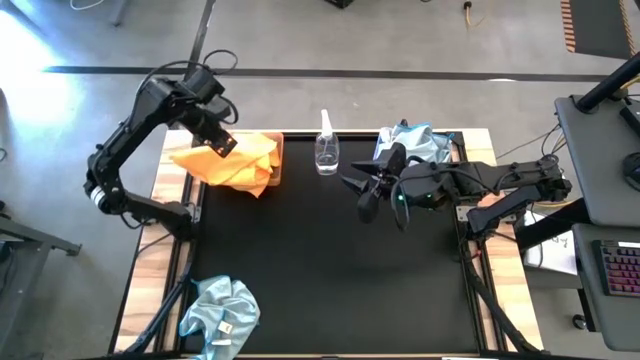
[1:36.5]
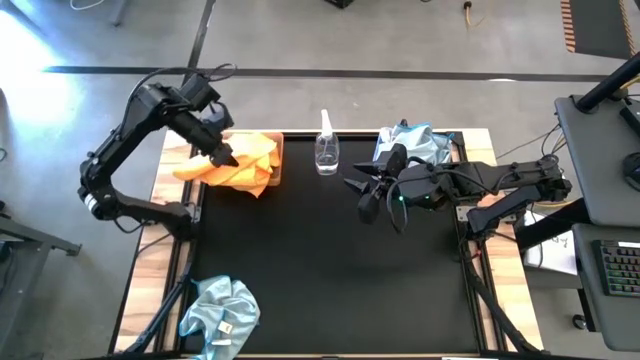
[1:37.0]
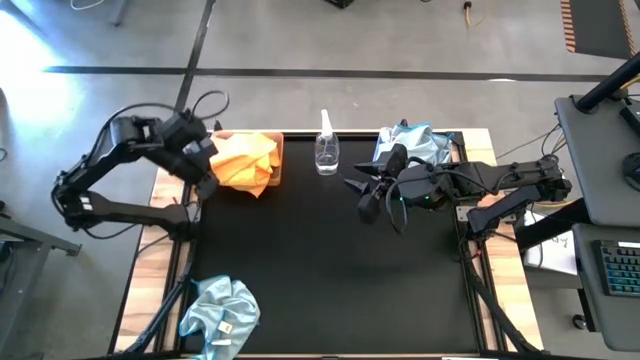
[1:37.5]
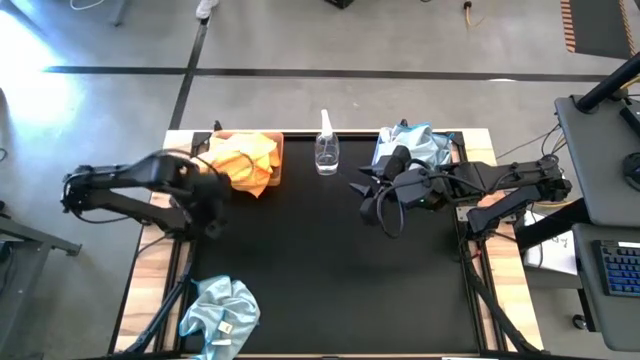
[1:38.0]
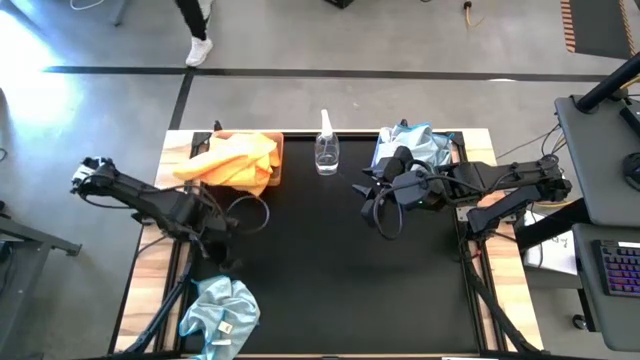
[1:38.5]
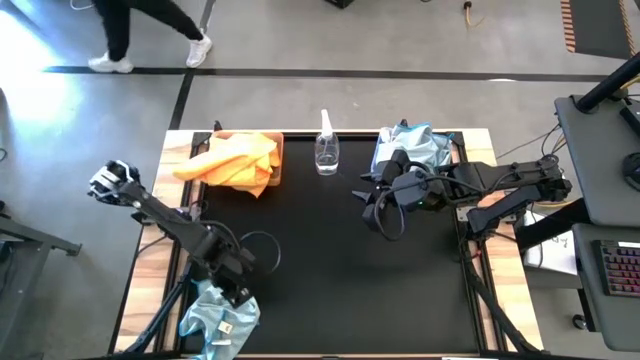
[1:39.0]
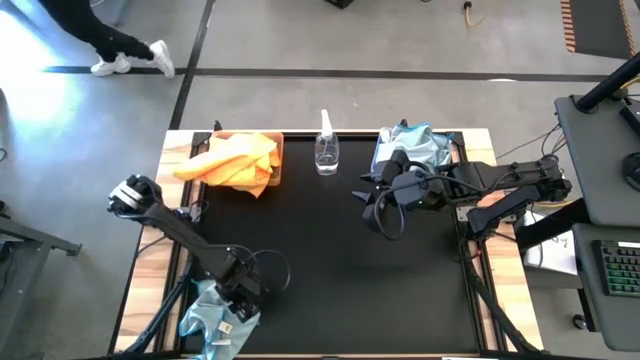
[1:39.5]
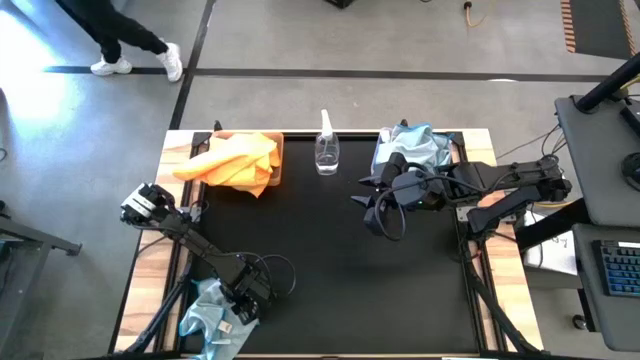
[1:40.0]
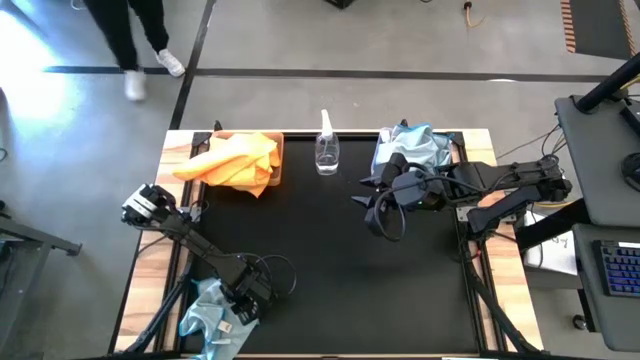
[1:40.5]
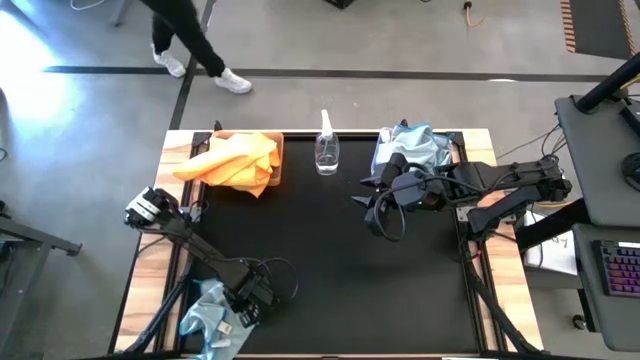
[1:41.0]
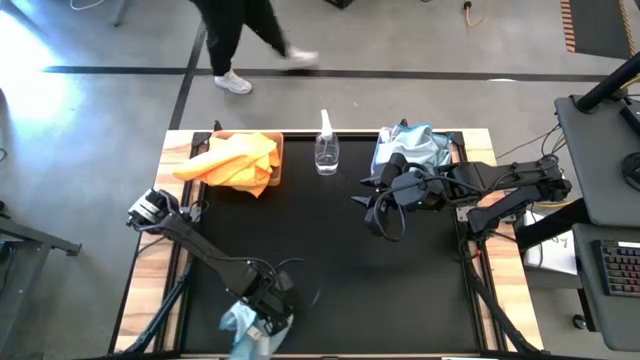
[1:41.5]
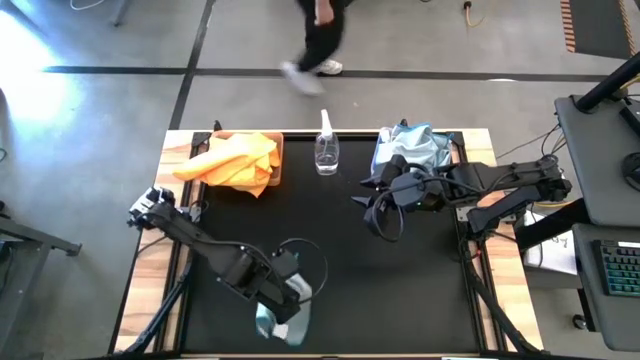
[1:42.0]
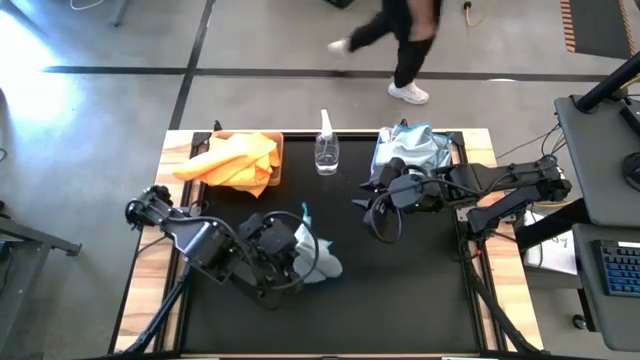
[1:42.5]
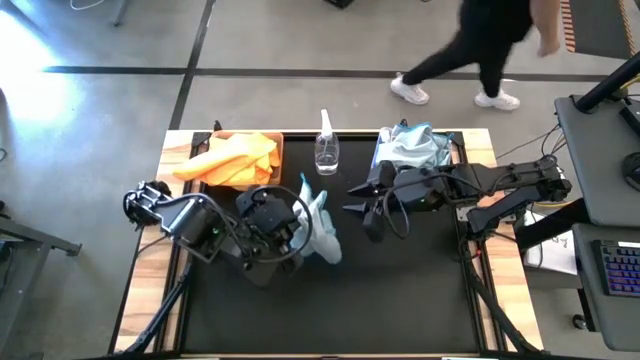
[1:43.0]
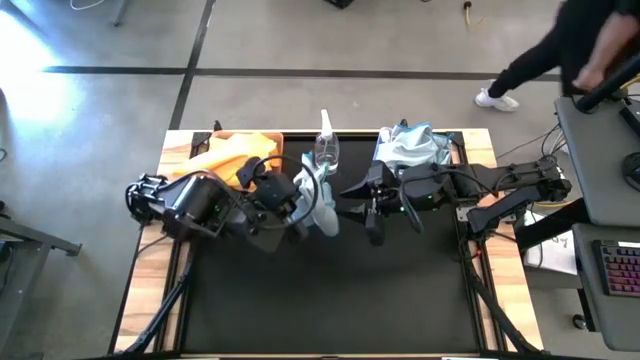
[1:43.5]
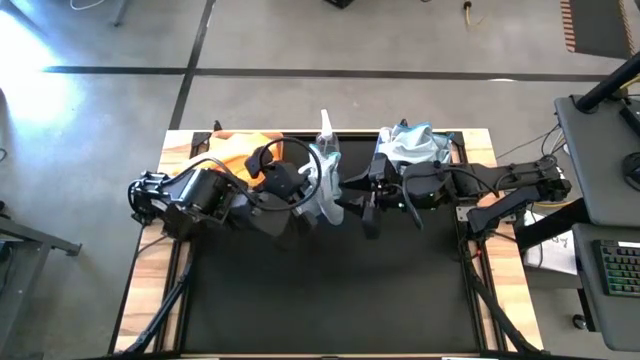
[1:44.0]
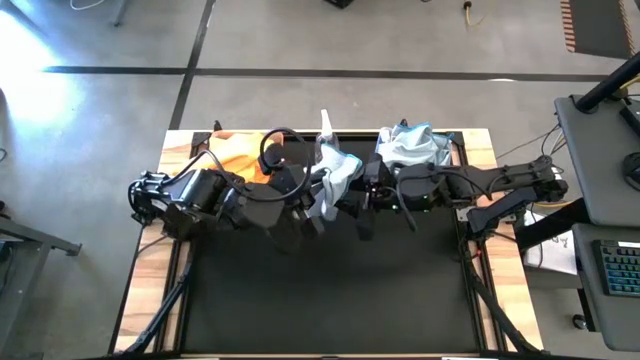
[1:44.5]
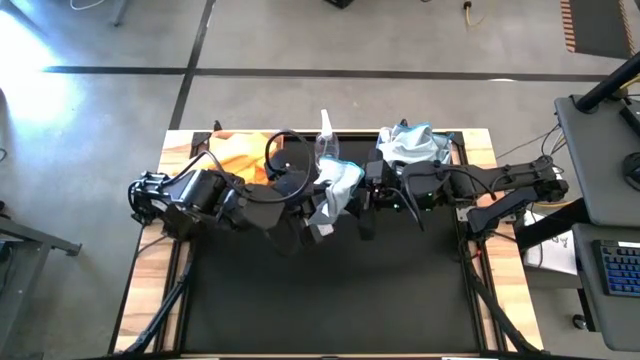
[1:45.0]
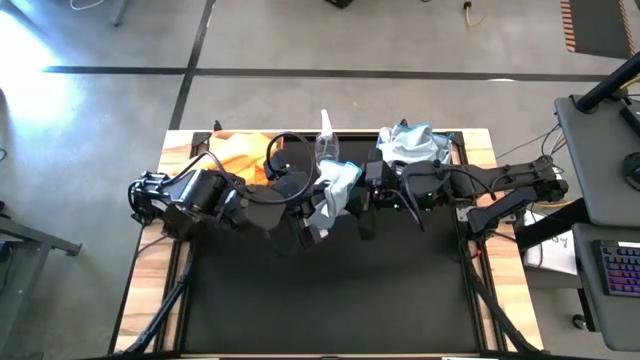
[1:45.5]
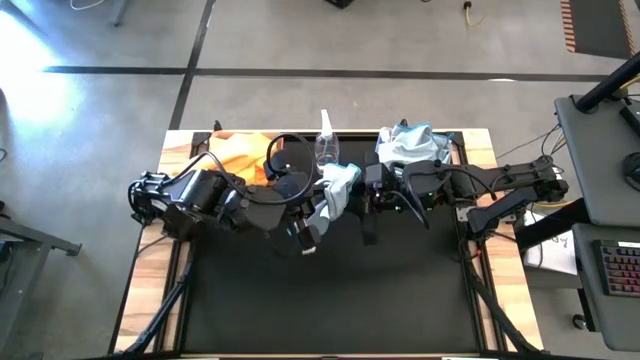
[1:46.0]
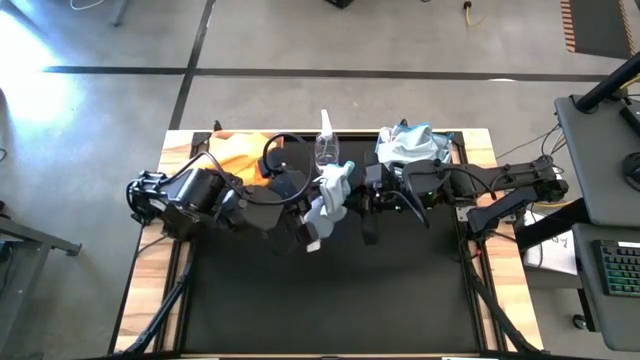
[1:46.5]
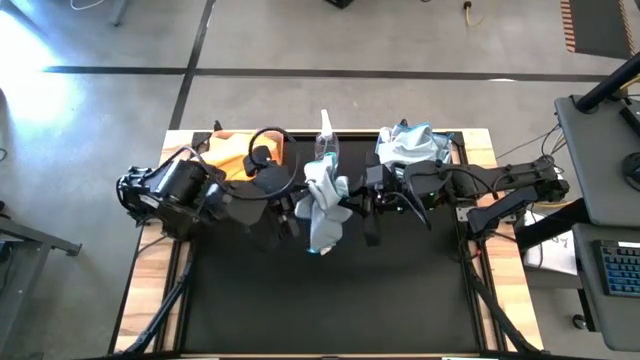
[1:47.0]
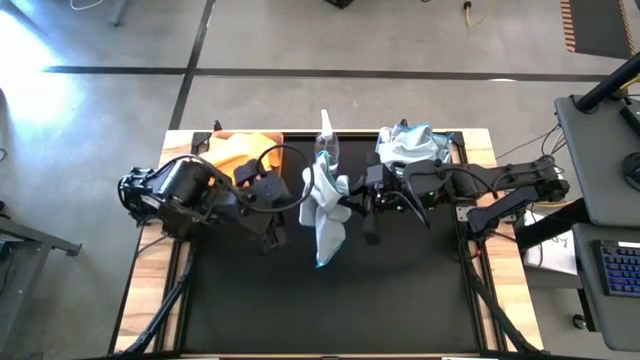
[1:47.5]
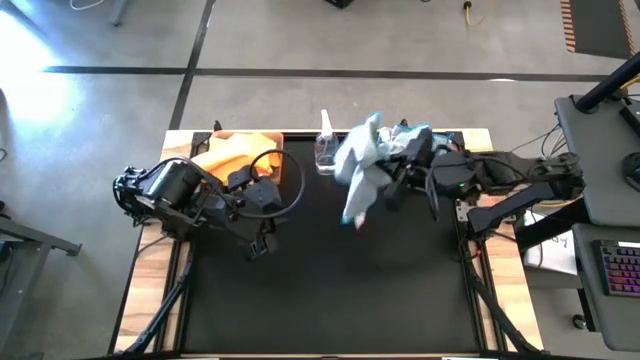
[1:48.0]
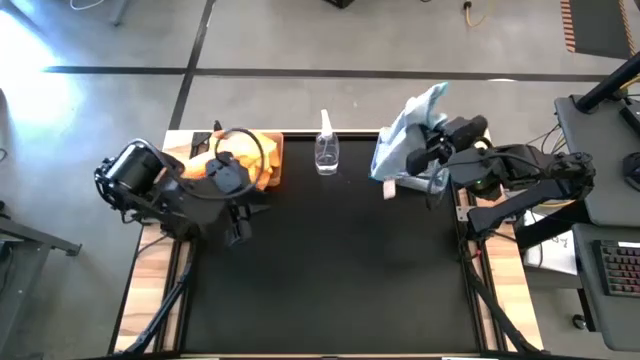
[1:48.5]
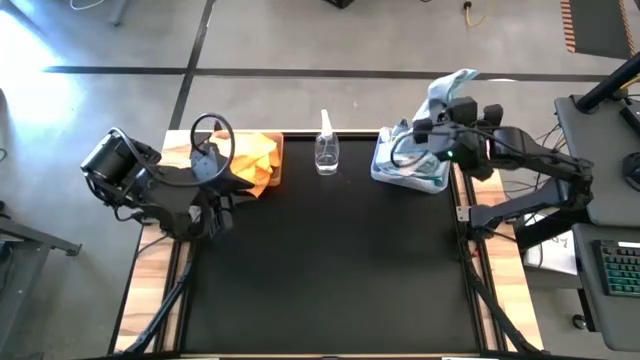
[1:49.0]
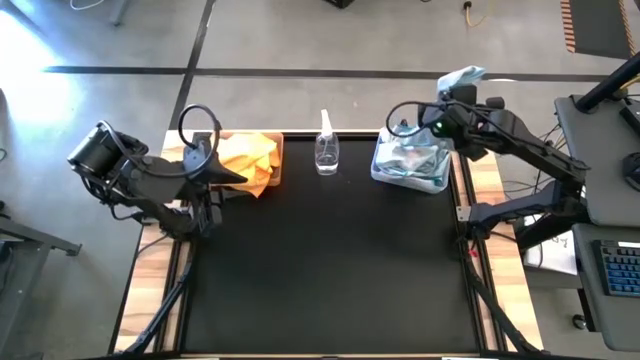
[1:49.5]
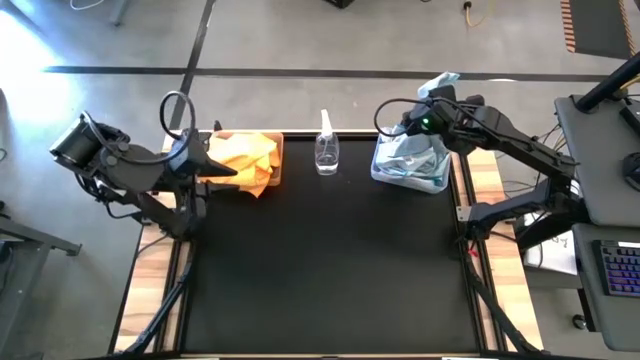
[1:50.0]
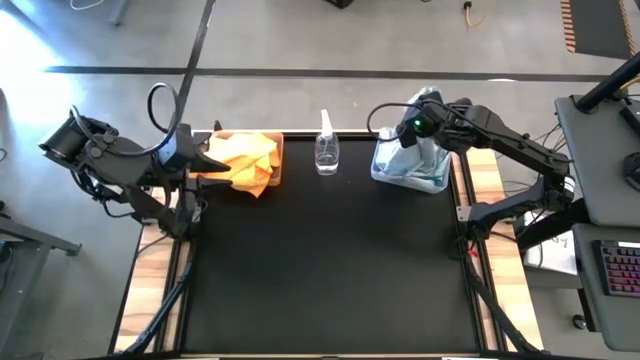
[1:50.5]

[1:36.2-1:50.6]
Task: Sort microfiber towel by color & place in baskets
Put the blue towel into the transparent bin

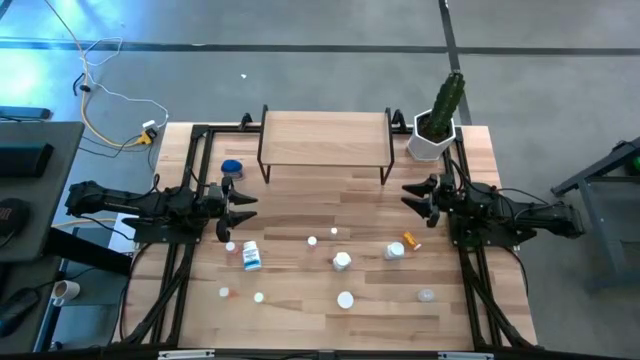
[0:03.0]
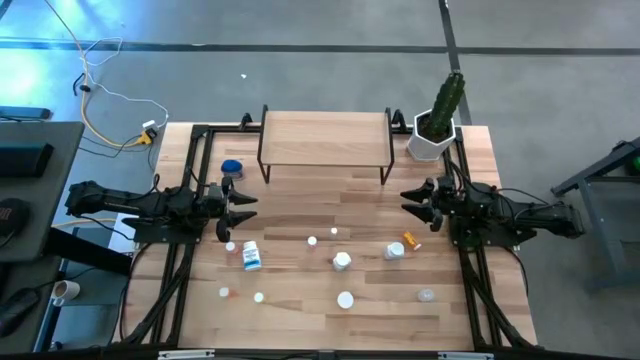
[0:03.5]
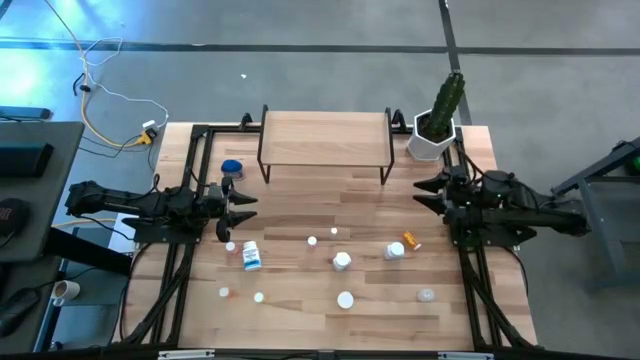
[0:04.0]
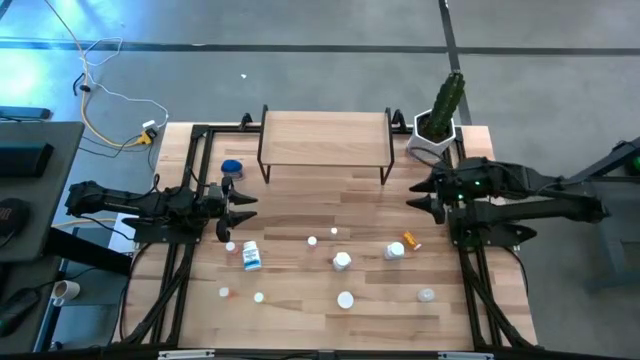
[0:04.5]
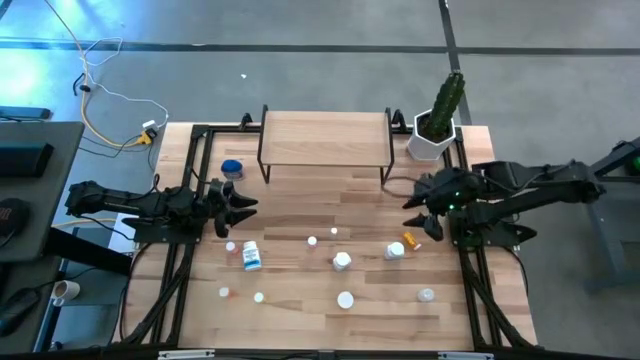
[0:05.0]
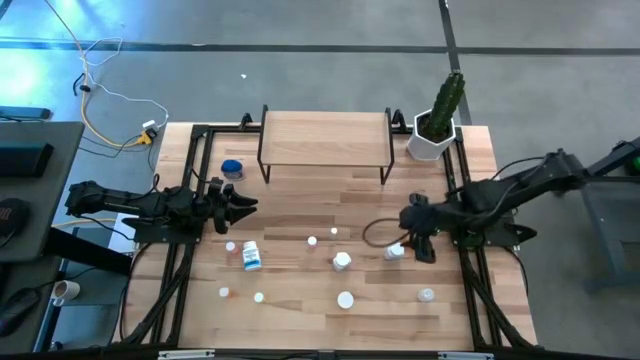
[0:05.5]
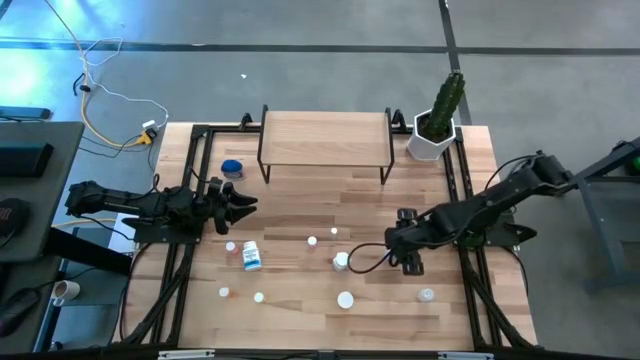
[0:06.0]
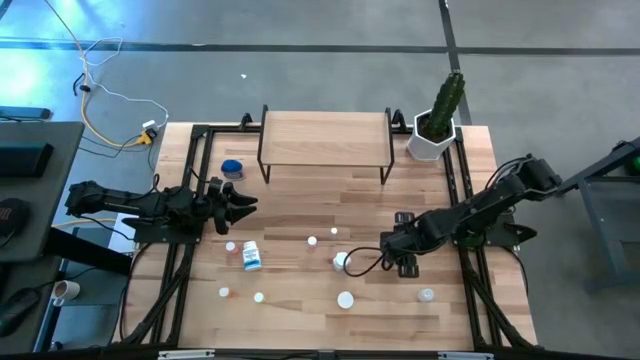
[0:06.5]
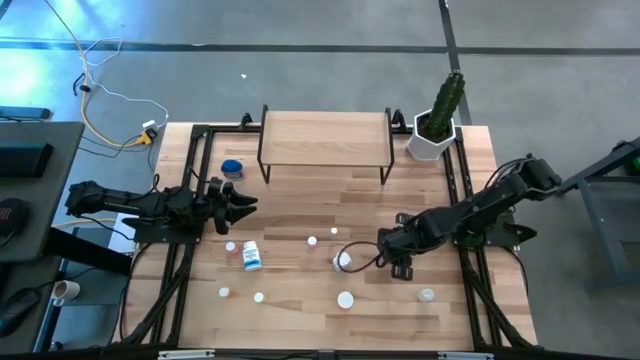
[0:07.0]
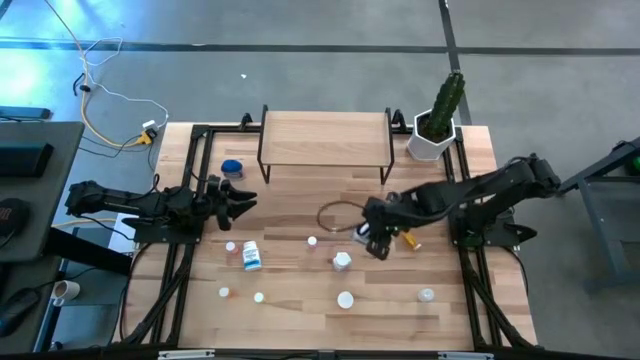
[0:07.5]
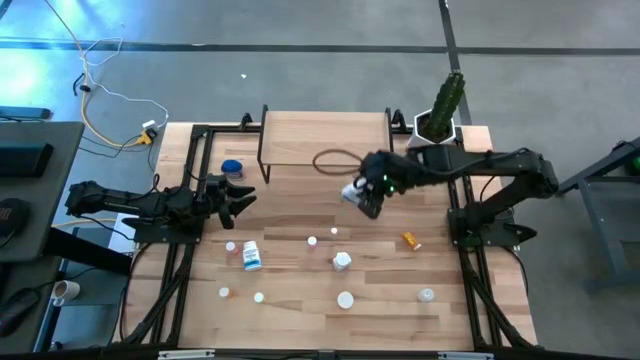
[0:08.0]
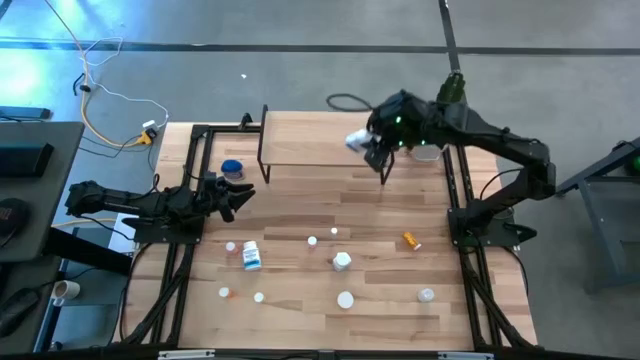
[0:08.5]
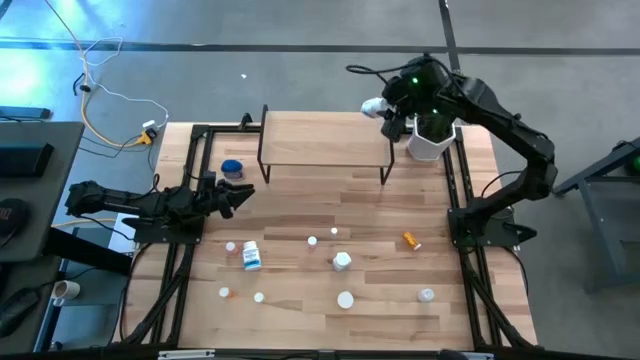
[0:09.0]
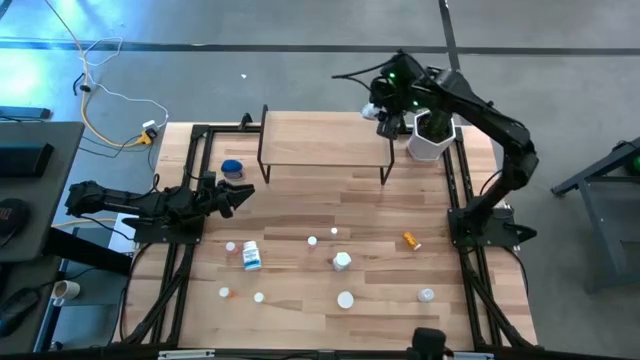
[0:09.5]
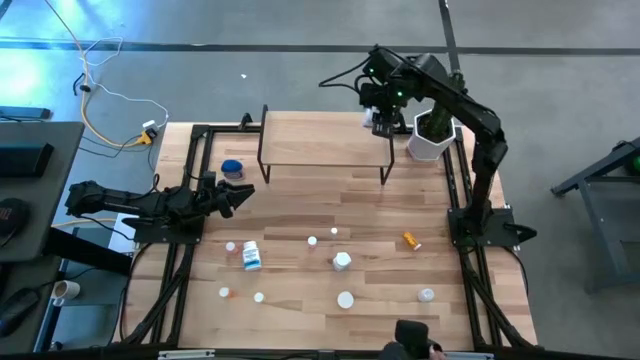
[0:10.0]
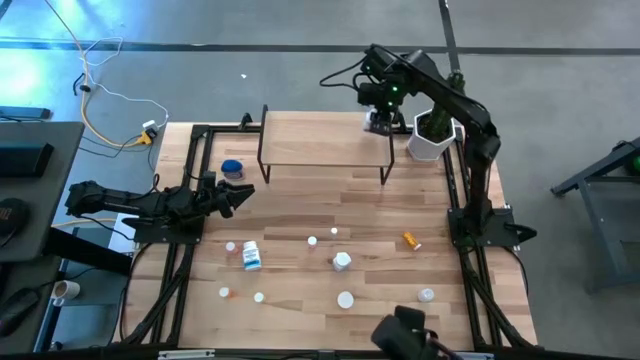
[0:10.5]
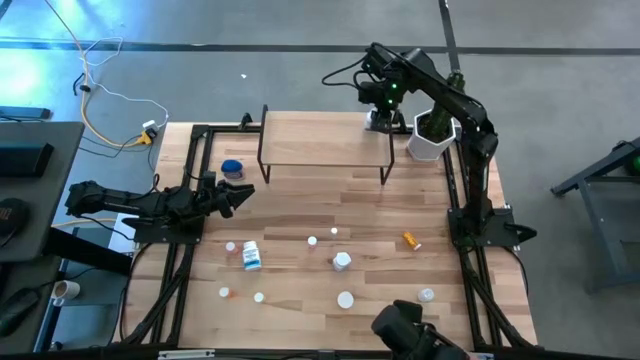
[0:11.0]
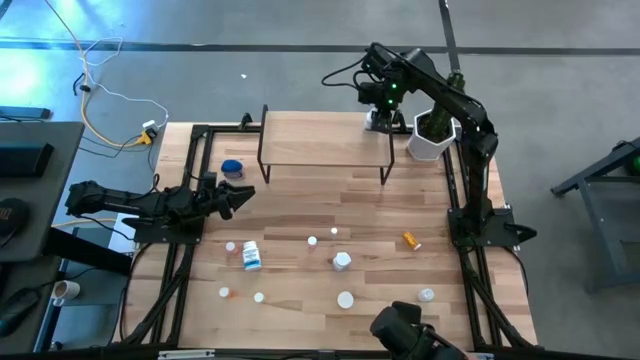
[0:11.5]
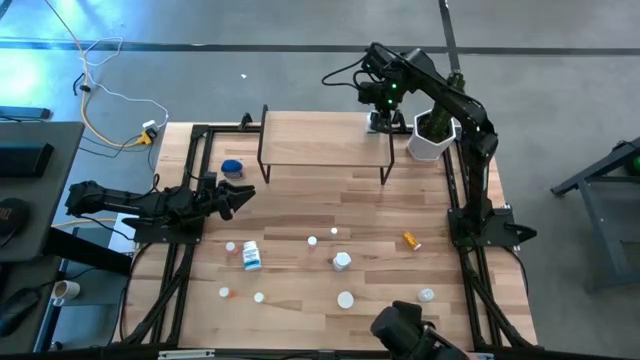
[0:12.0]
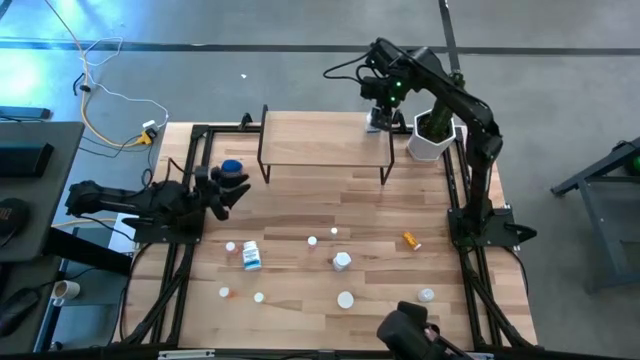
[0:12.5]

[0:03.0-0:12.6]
Task: Pick and place medicine bottles onto shelf by color
Put the white pill bottle on the shelf
